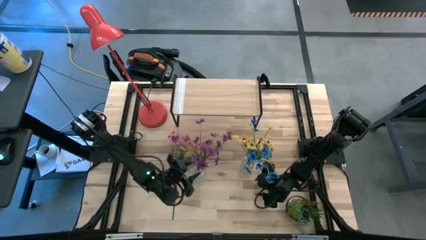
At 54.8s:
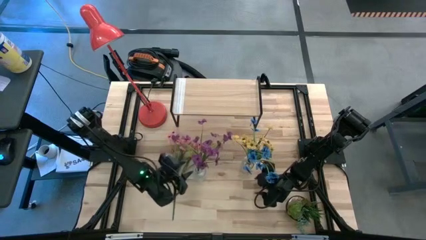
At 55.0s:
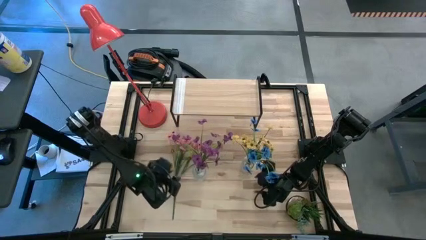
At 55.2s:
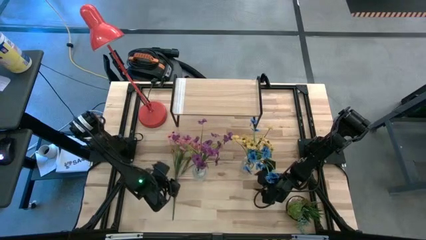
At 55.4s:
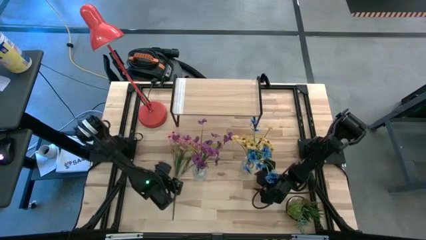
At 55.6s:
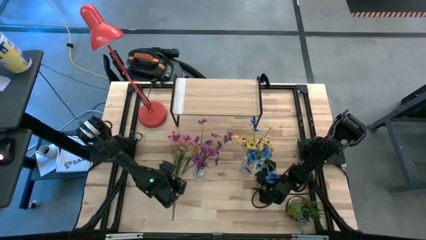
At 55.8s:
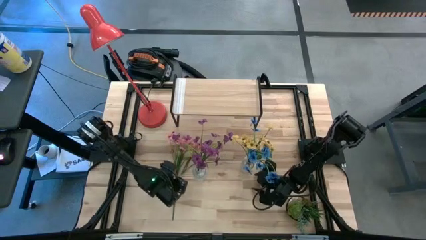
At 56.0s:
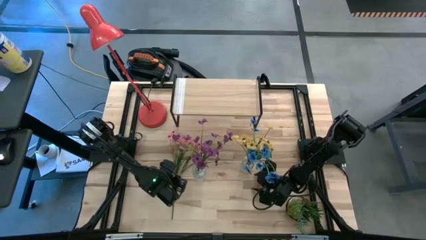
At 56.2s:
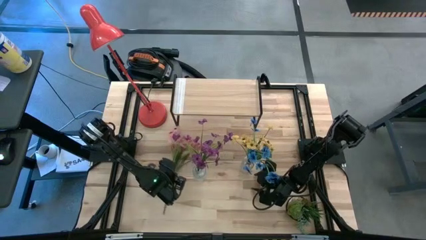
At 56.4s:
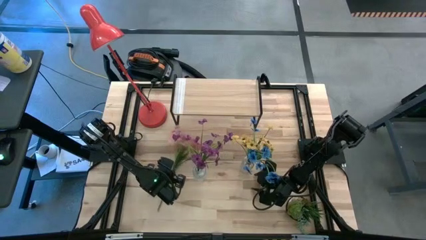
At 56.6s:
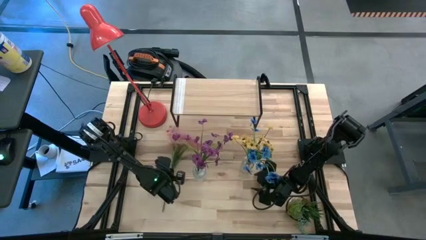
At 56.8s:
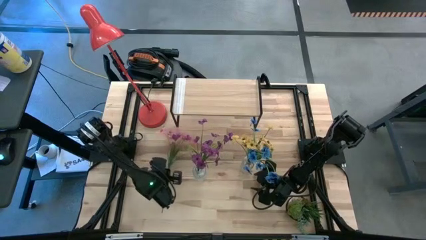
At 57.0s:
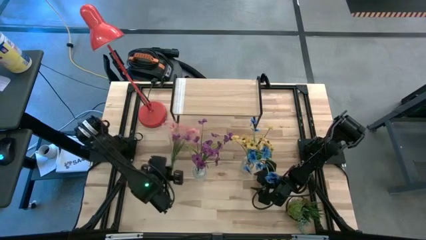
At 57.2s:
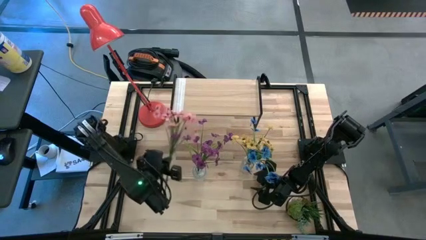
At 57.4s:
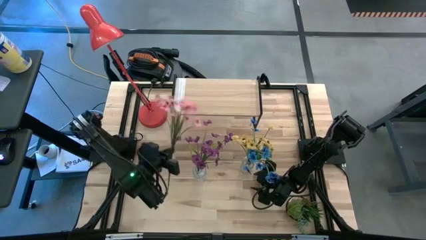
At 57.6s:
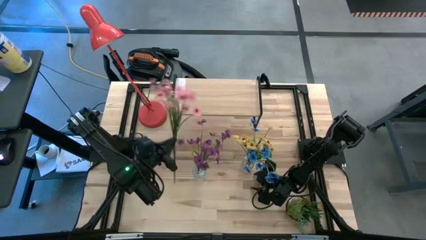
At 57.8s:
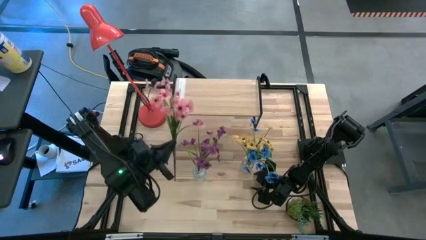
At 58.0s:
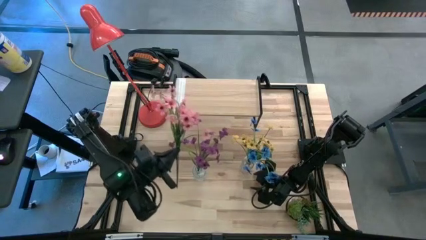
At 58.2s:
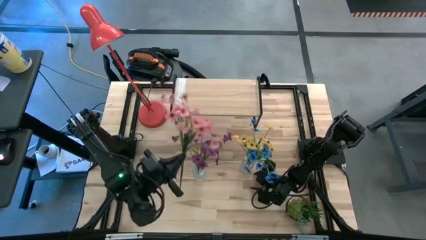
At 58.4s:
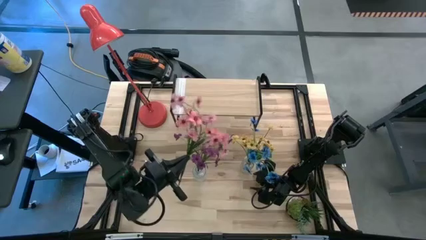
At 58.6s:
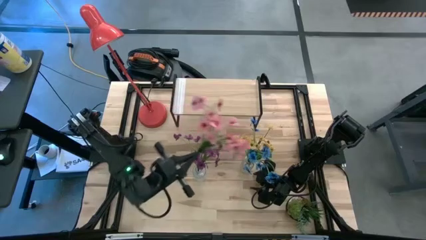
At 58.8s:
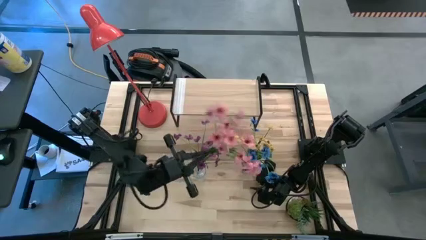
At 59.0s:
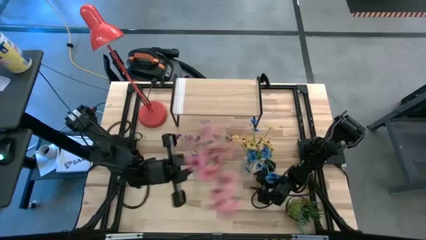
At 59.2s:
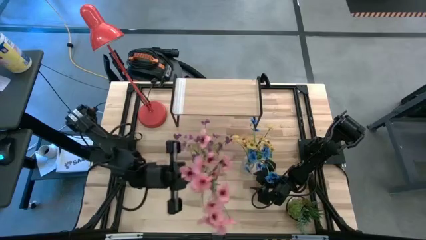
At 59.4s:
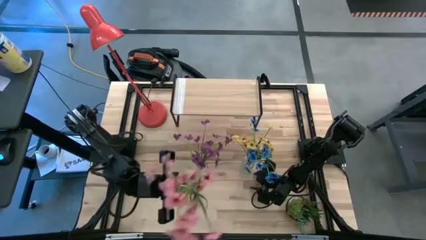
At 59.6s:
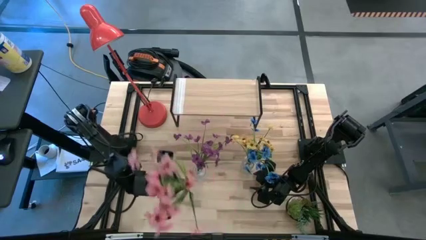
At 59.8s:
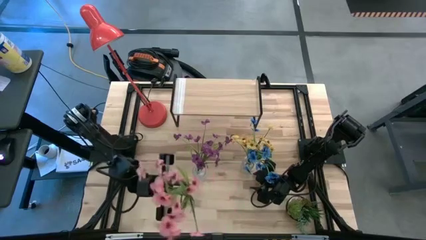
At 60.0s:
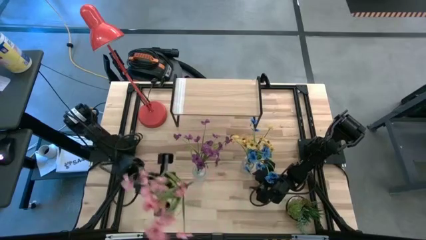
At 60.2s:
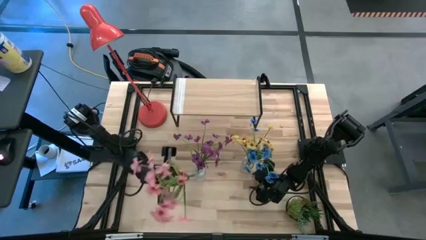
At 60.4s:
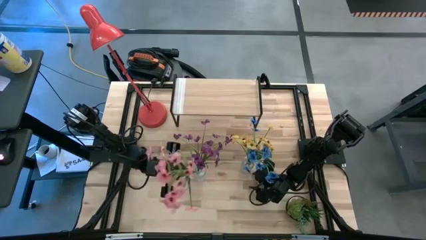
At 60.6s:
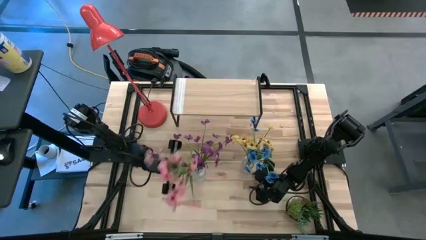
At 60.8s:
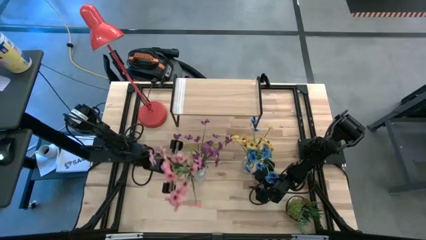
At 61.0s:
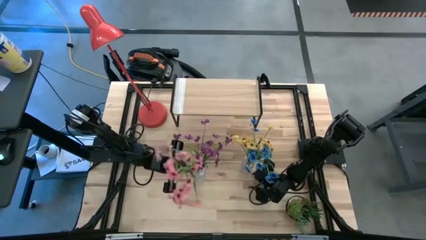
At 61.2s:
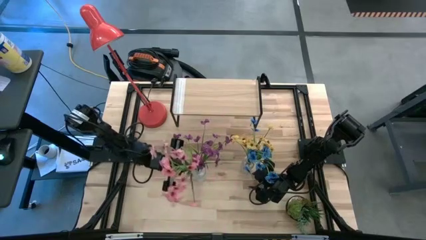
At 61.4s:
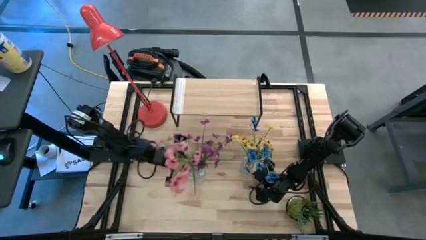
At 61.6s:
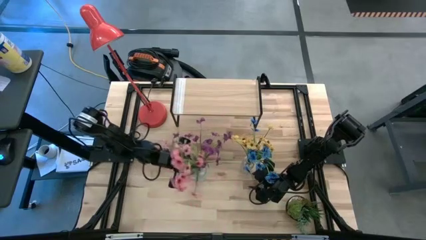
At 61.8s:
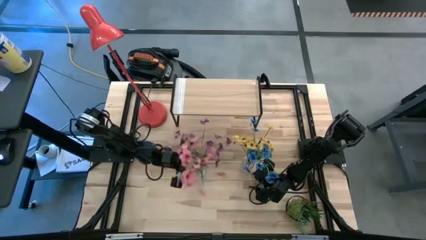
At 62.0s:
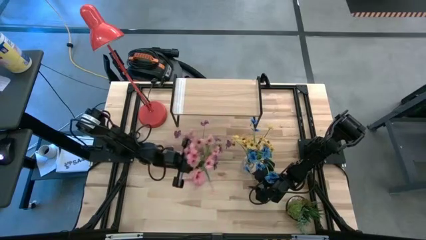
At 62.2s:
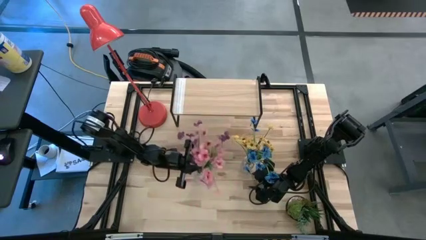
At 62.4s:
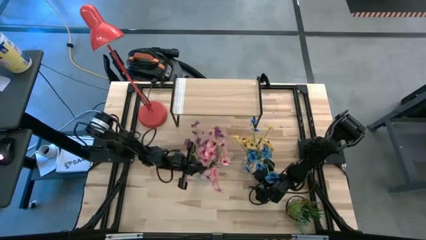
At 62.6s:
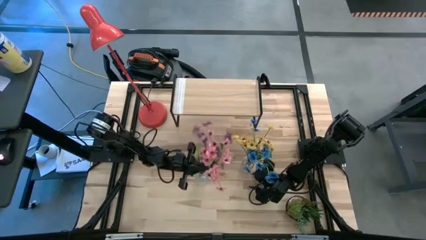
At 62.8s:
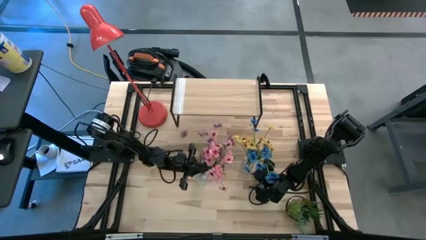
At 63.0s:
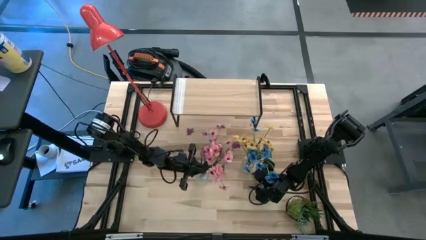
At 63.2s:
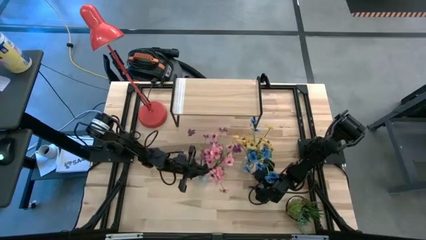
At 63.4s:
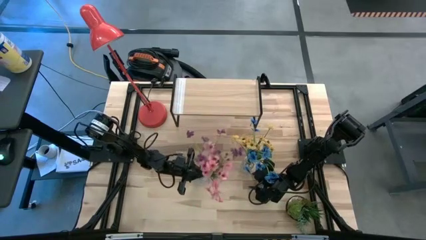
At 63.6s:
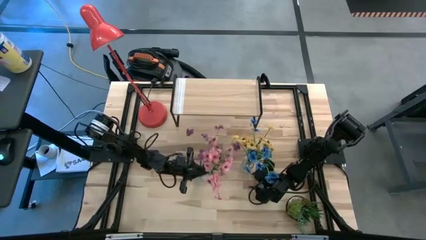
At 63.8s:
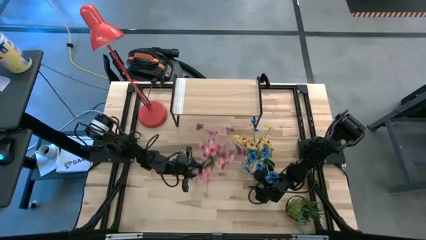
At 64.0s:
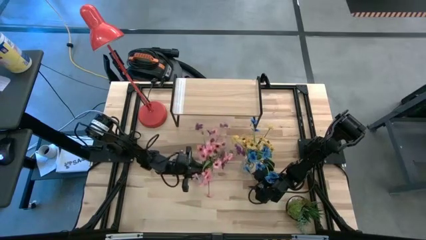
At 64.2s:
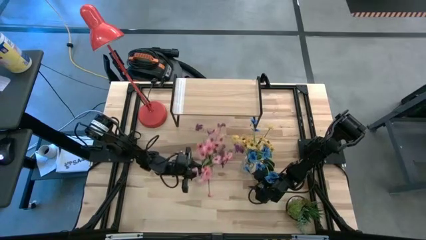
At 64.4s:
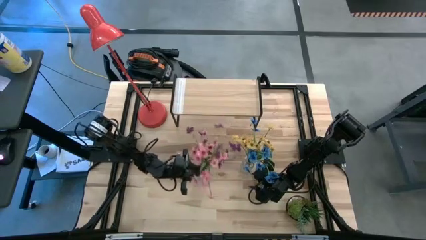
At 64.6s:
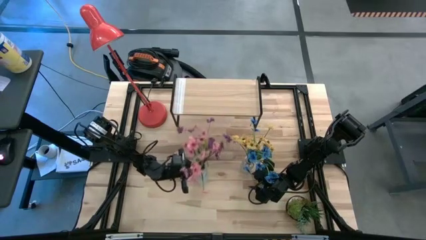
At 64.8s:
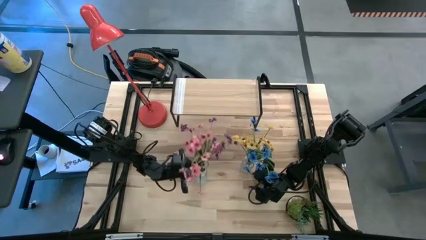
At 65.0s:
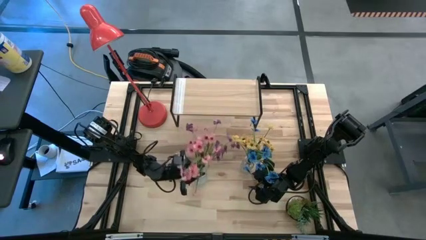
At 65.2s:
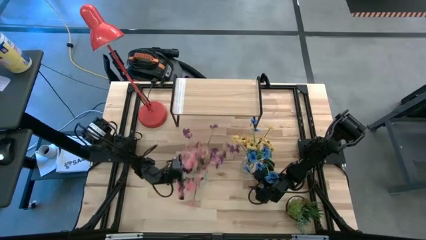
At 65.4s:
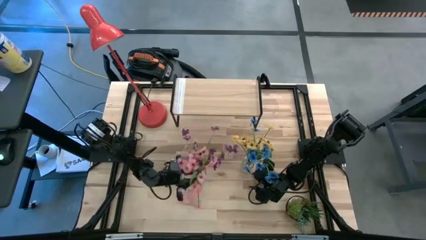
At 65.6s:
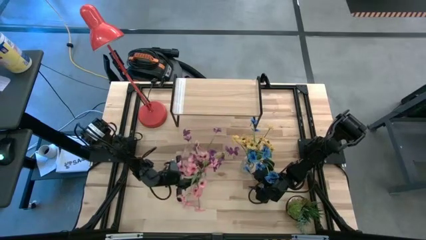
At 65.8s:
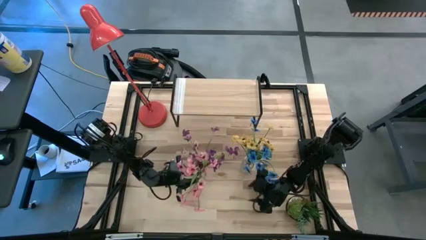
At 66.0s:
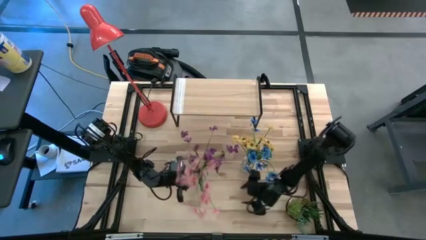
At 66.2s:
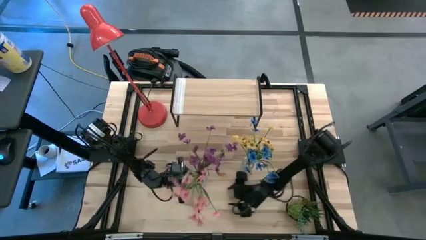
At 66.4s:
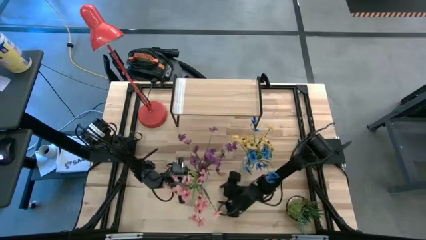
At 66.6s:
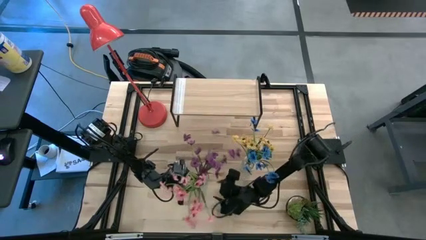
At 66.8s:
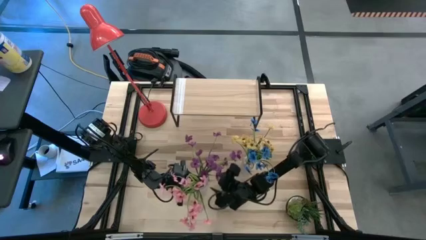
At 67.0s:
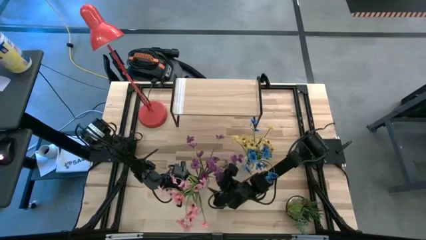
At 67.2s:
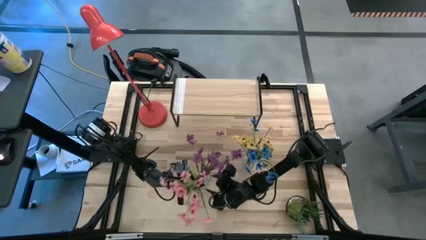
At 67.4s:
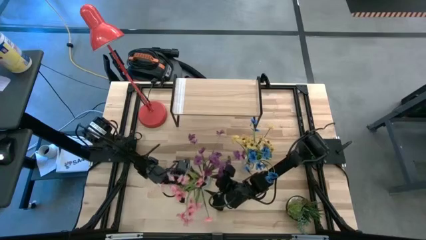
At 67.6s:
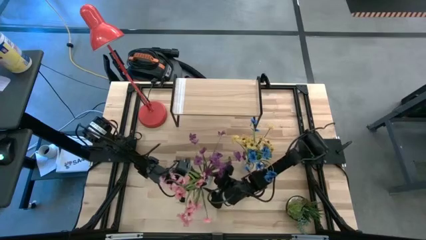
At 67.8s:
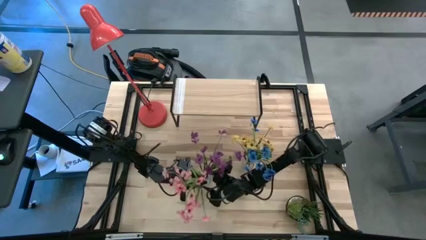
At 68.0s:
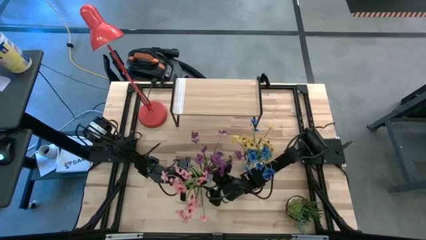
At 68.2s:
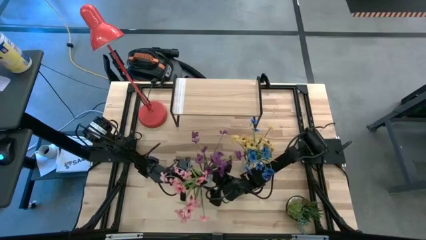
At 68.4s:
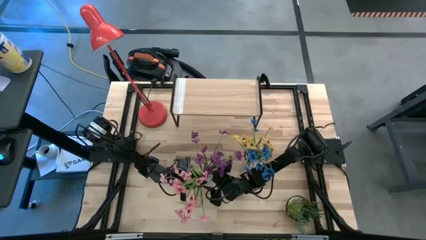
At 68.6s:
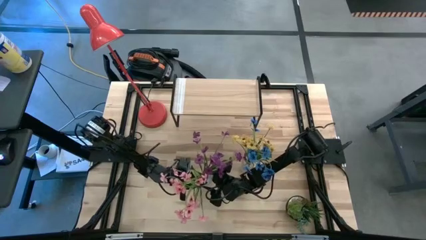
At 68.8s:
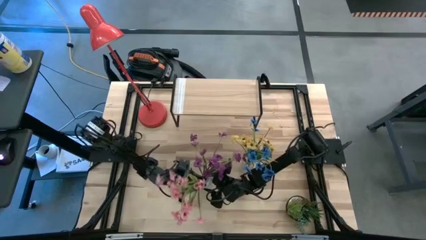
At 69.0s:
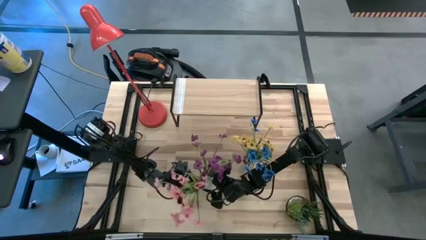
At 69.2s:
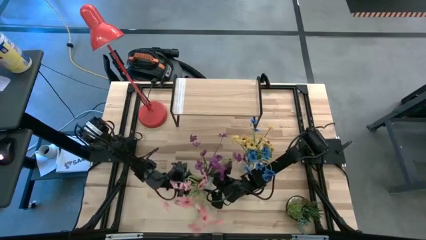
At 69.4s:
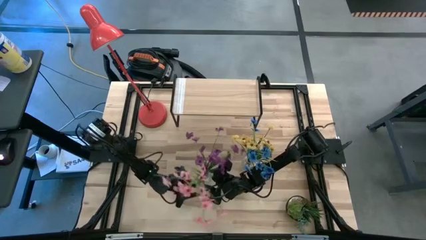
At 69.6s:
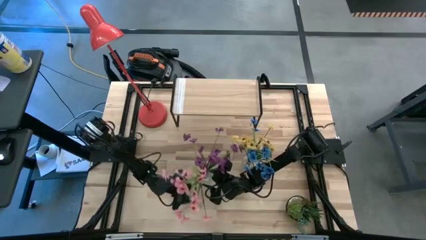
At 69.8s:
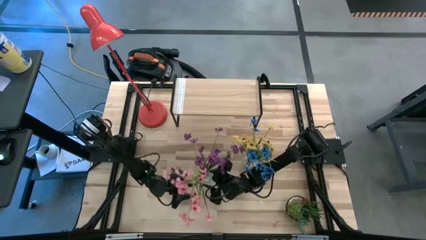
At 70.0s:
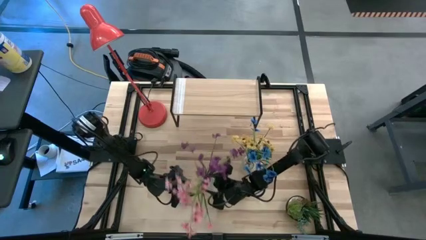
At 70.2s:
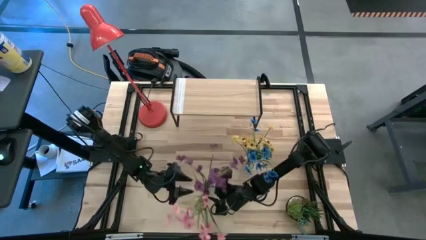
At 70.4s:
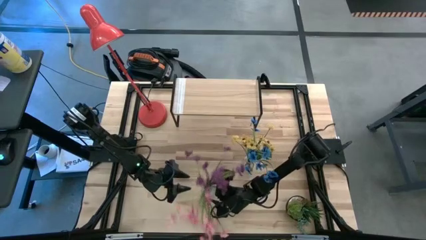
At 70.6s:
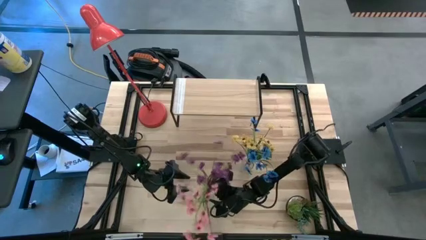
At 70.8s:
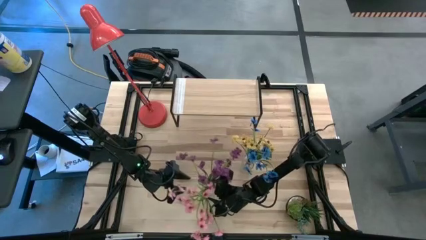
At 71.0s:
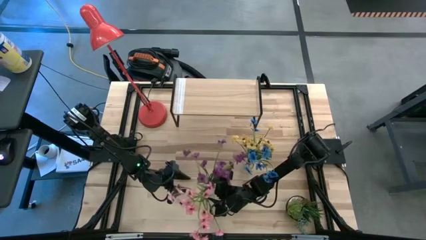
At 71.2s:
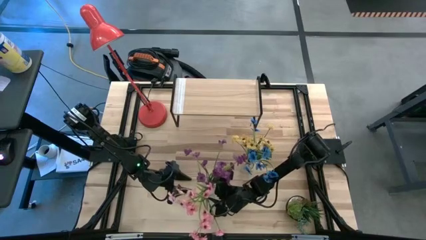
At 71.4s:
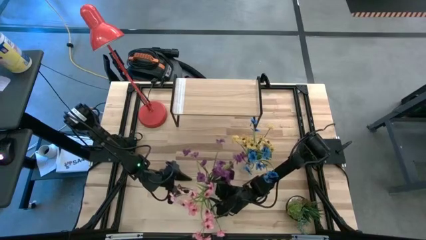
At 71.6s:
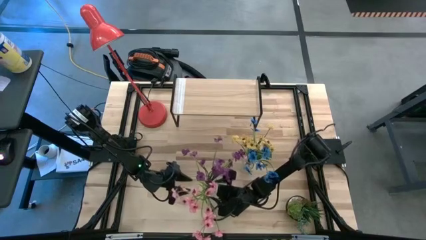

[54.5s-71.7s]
Task: Pick and place flowers into a vace then onto a shelf
Put the pink flowers into the bottom vase
